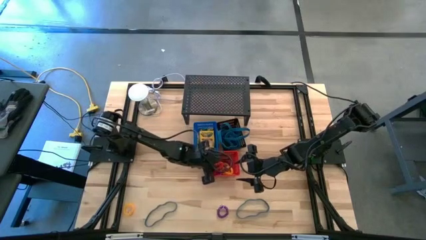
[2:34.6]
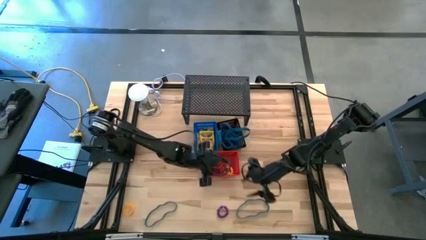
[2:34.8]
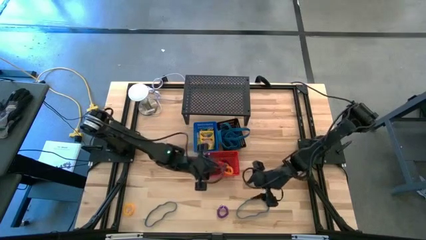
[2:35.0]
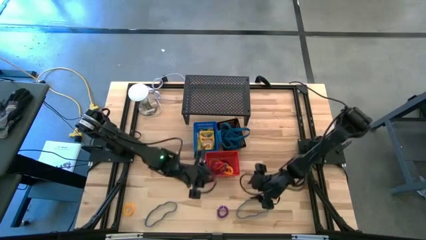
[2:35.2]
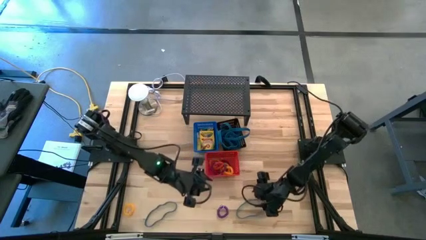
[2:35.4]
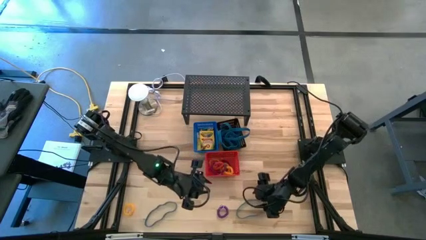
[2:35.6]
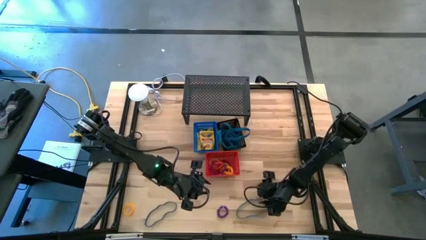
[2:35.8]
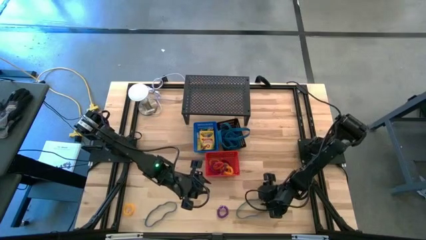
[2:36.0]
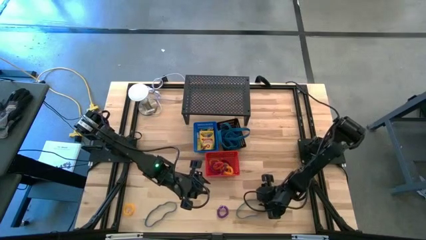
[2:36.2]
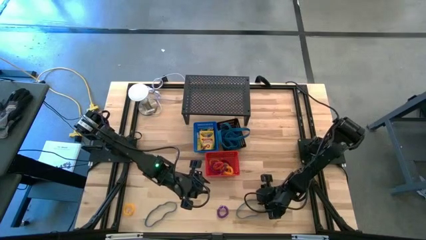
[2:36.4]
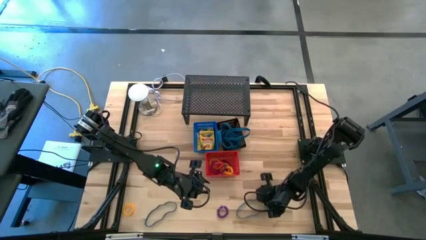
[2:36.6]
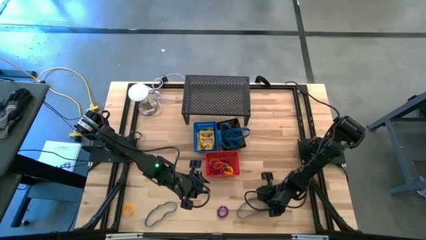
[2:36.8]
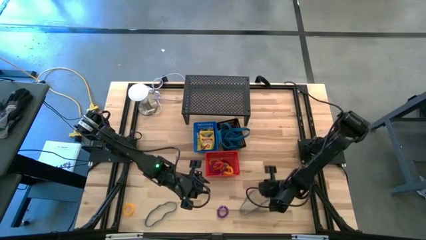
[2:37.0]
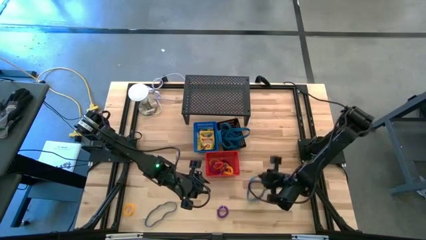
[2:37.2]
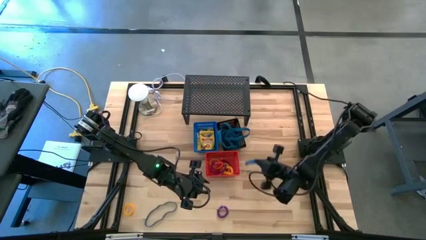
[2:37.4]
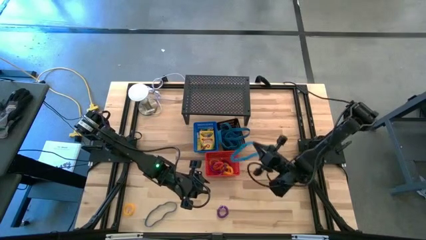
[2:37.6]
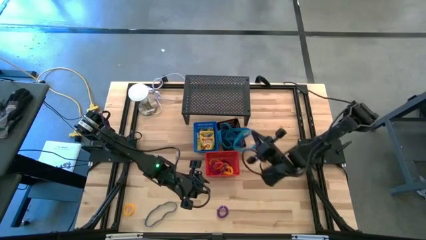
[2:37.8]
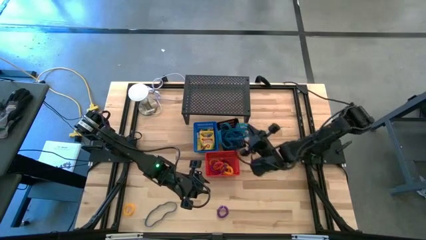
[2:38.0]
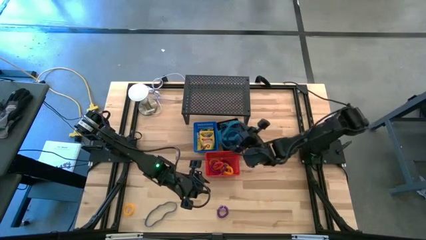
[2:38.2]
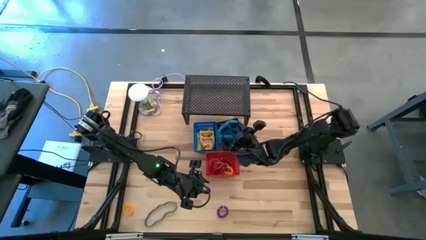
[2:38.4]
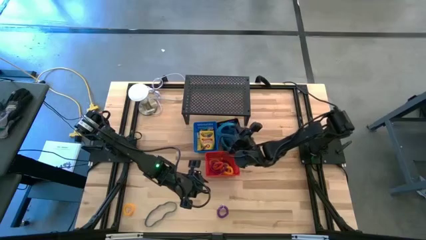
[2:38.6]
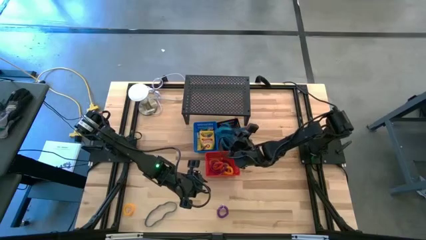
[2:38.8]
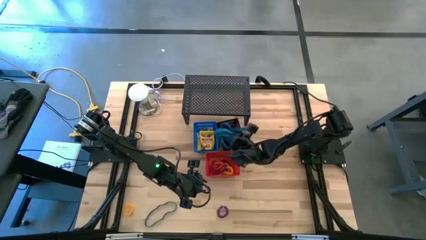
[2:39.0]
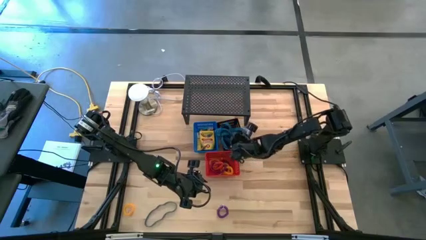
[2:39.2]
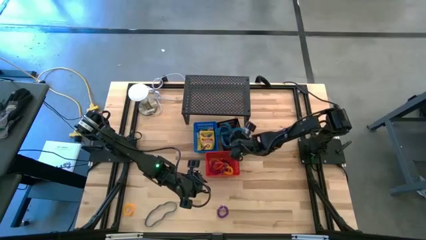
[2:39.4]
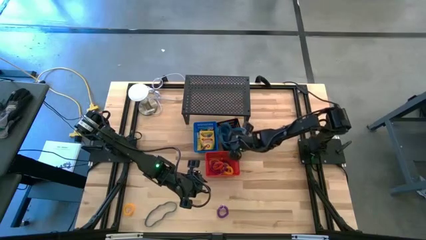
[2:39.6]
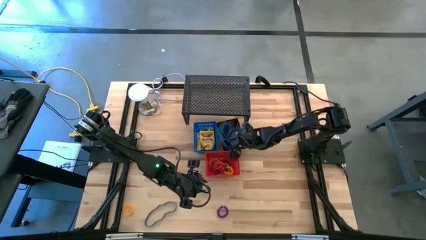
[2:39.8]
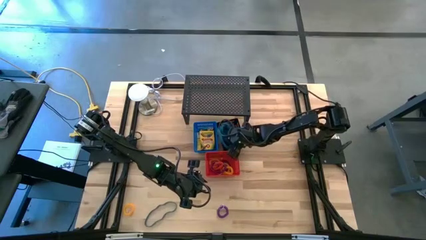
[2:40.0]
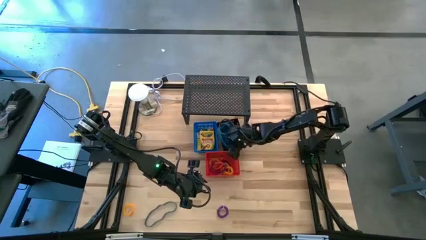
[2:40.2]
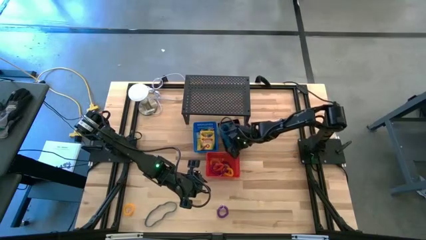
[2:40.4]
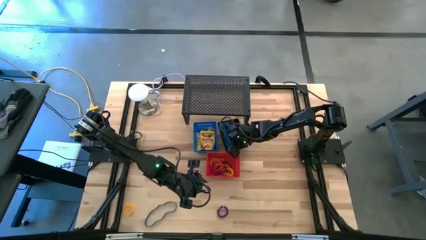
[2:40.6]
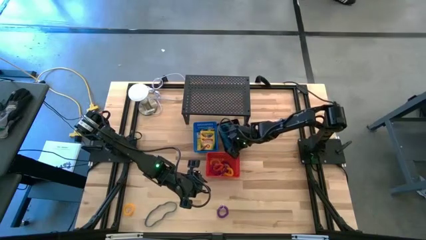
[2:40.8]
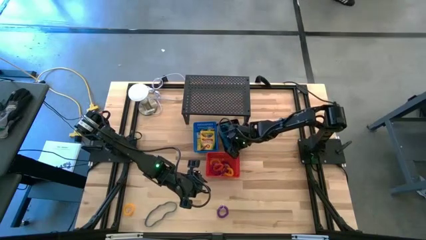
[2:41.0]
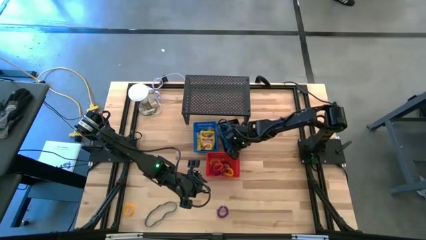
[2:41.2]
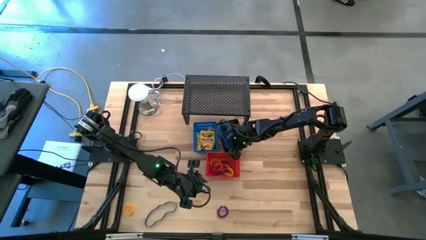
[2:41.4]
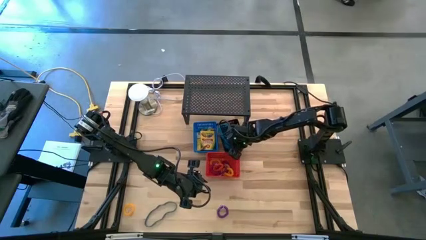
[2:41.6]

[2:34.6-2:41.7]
Task: Pick & Place Office Desk Supplies
Put the blue rubber band into the black bin

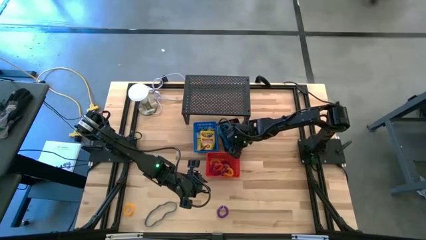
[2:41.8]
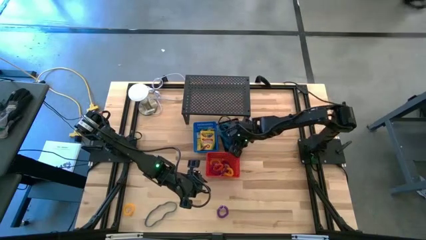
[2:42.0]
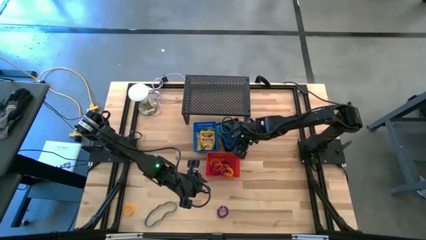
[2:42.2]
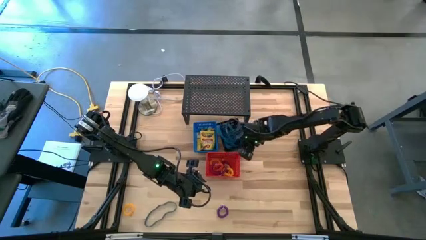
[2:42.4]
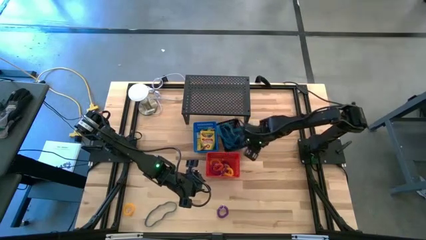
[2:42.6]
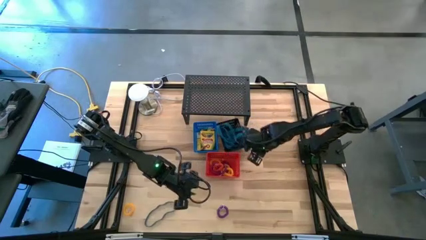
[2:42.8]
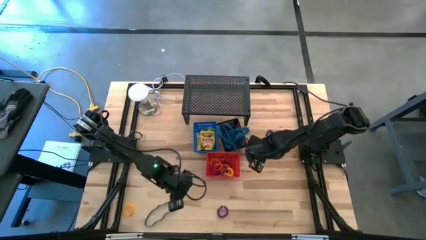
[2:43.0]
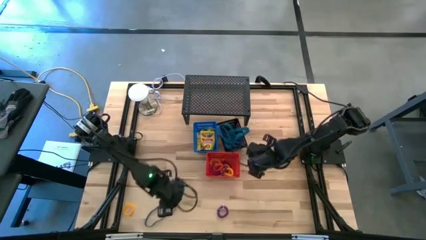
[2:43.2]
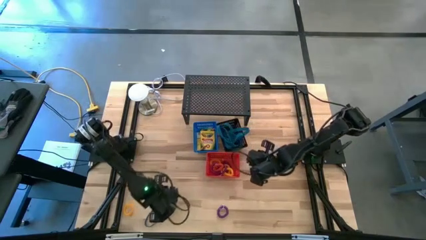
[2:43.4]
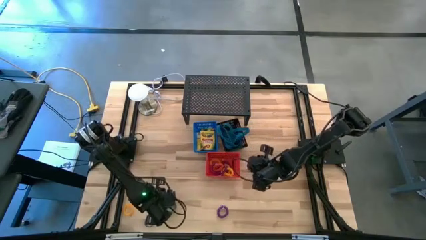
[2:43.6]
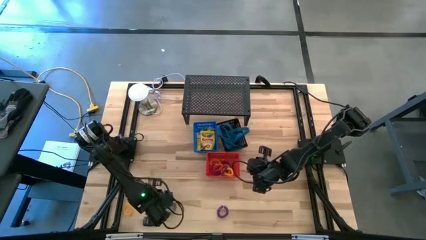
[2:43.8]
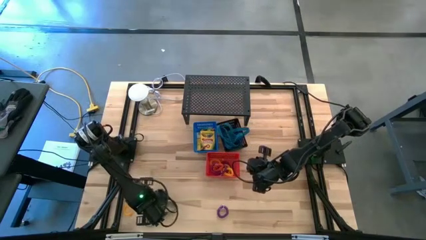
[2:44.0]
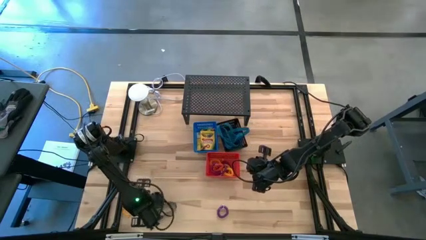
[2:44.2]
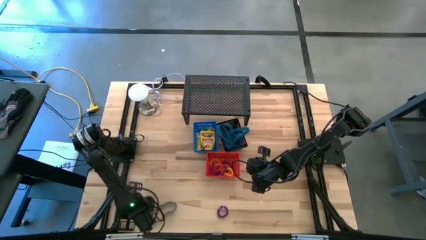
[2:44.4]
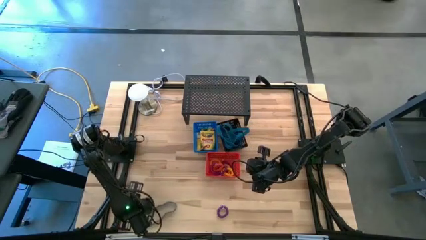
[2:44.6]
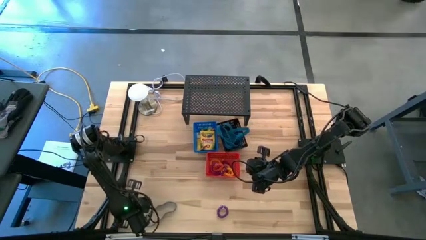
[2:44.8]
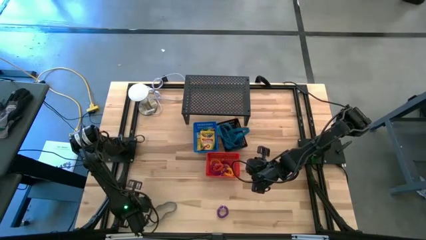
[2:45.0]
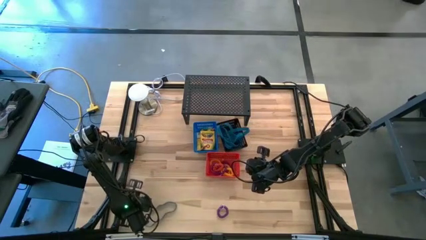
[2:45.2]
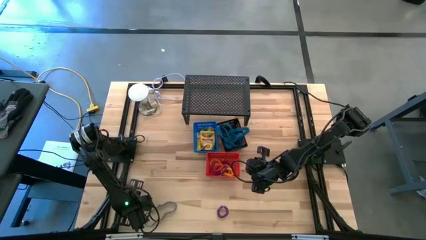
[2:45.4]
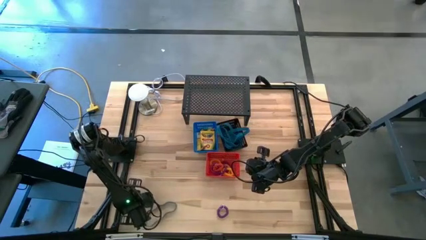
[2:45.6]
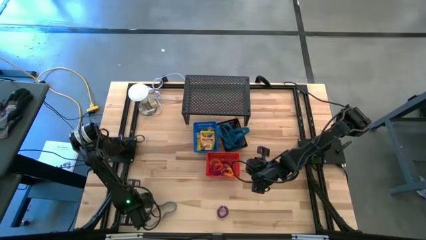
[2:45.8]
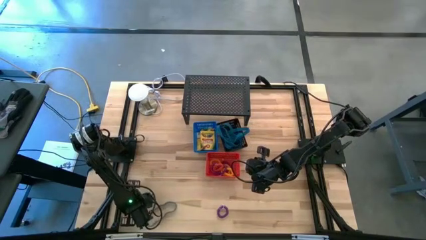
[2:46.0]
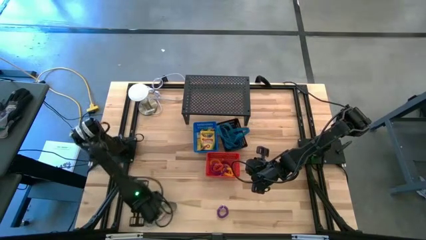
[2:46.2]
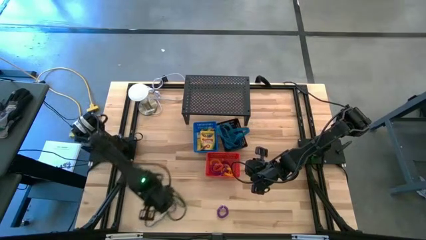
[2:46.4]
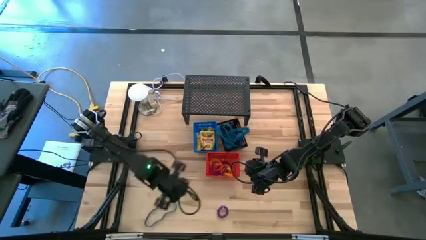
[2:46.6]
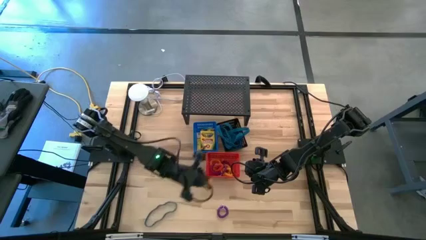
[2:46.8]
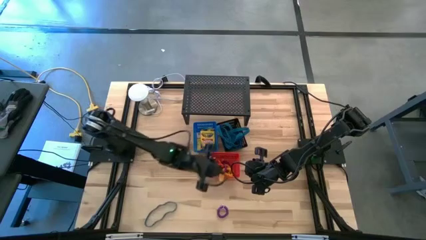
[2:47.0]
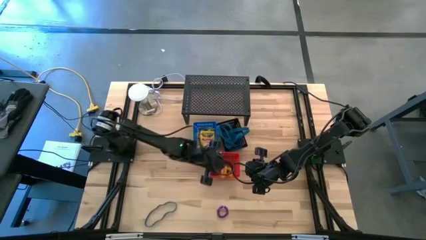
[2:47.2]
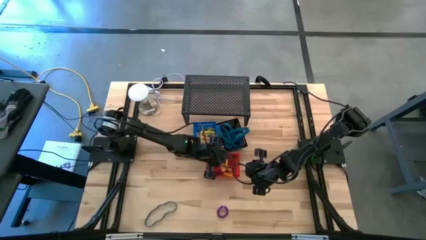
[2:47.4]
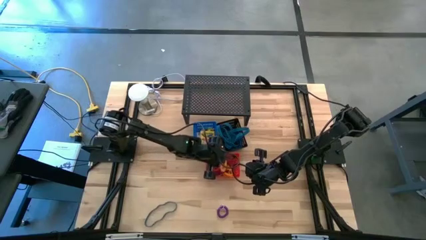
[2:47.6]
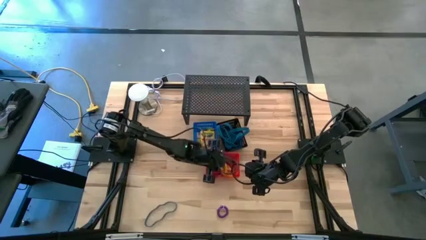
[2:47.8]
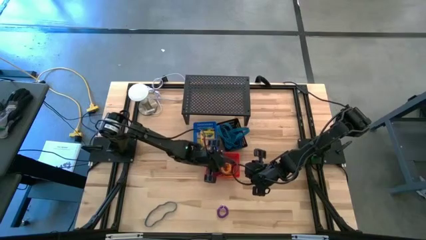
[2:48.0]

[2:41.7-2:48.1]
Put the yellow spring keychain into the red bin

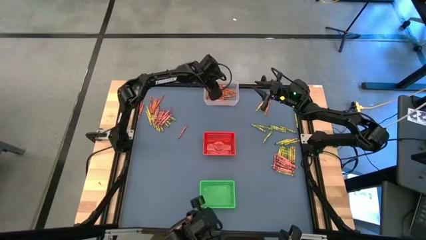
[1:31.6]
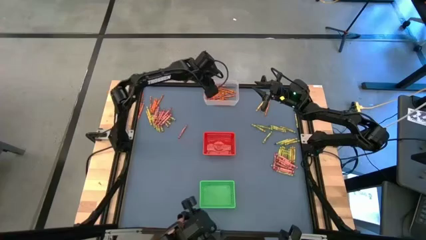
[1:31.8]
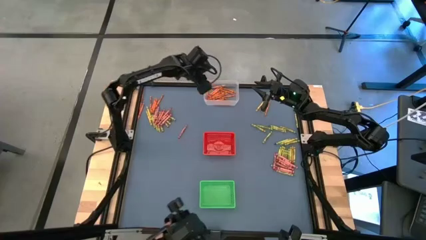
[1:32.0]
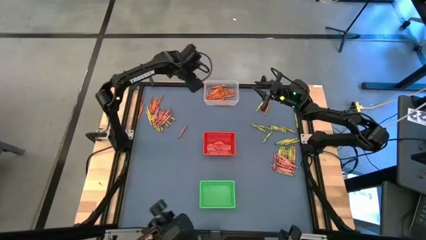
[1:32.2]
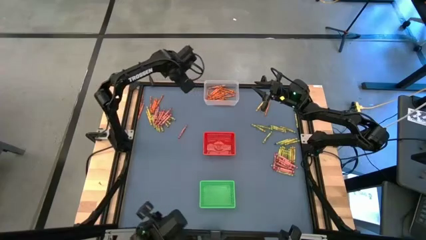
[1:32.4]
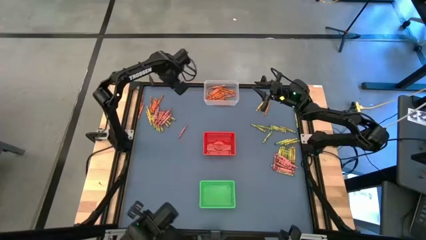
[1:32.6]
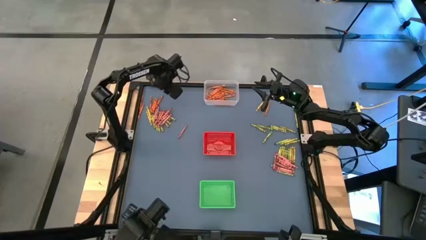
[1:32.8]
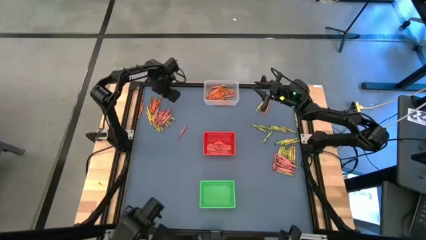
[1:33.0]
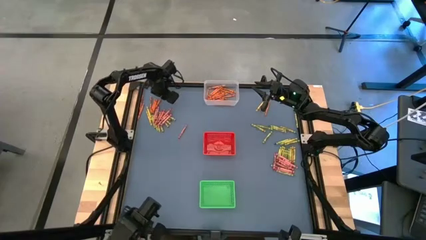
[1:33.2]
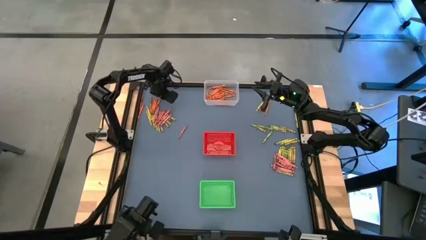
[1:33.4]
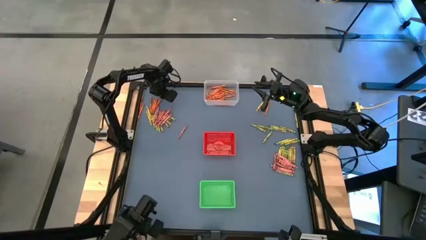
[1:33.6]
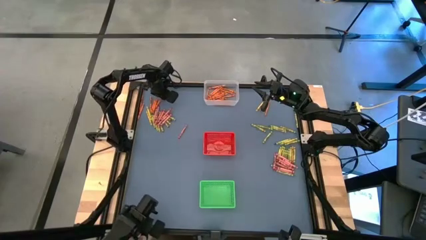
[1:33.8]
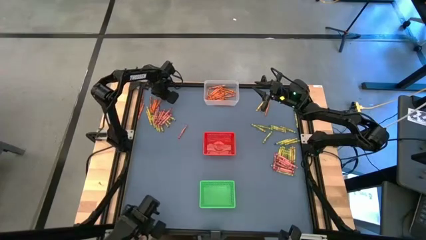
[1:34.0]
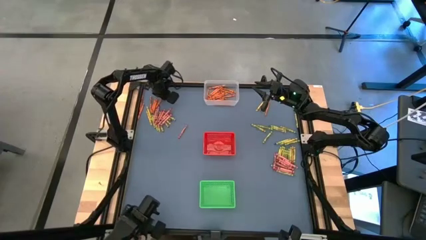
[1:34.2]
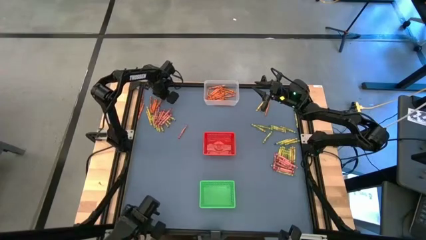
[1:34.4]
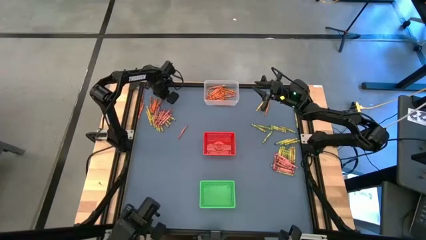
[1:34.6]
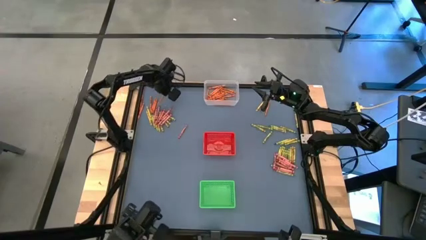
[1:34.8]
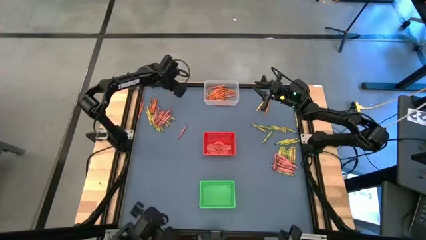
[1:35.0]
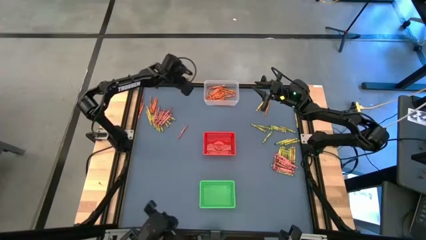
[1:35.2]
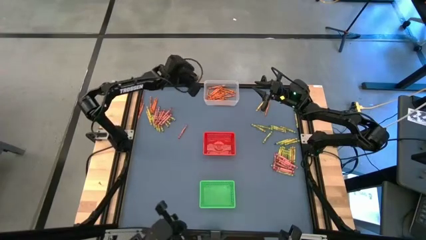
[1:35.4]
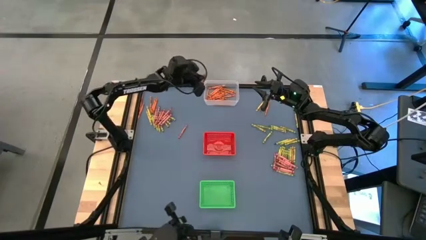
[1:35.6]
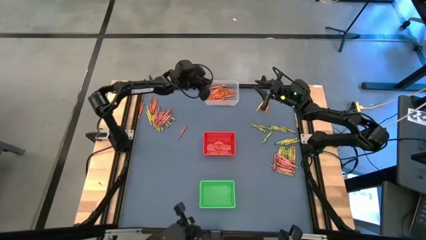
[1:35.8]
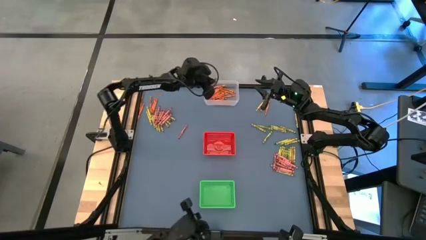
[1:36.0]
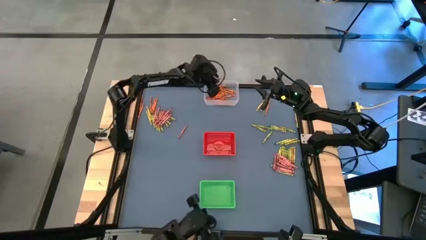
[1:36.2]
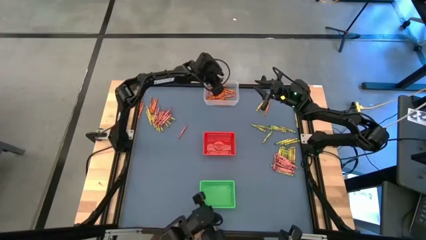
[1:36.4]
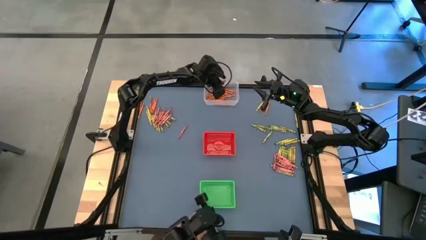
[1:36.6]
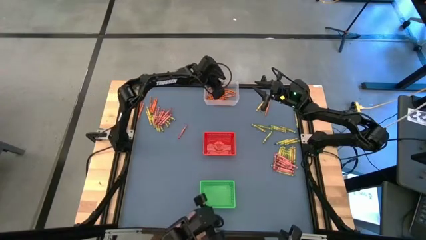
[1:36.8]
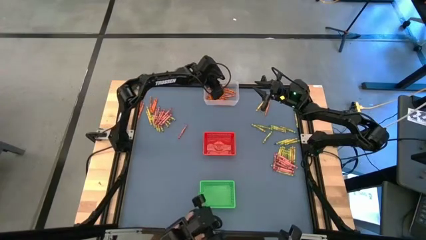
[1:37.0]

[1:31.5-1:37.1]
Task: Sort crayons
Put the orange crayon into the transparent bin
